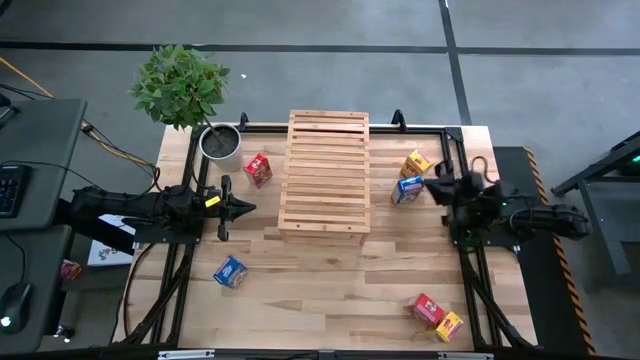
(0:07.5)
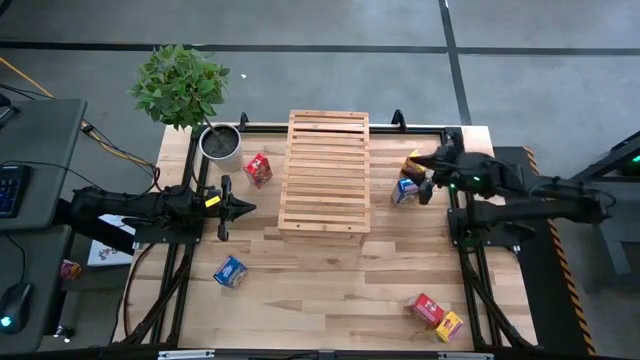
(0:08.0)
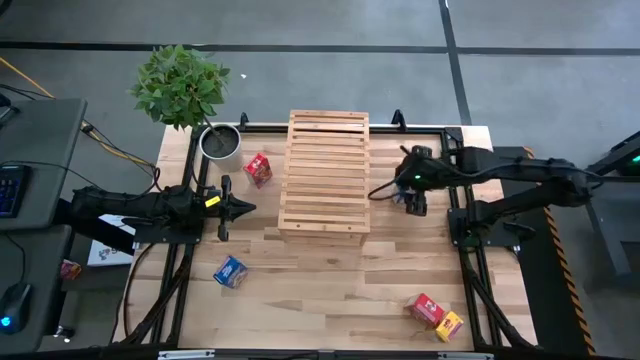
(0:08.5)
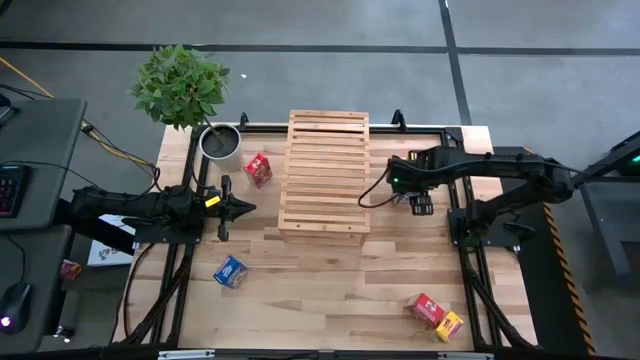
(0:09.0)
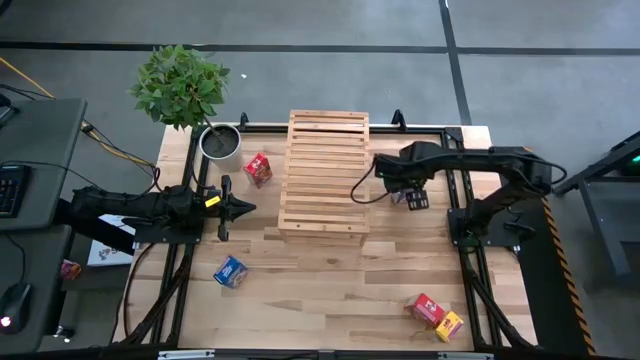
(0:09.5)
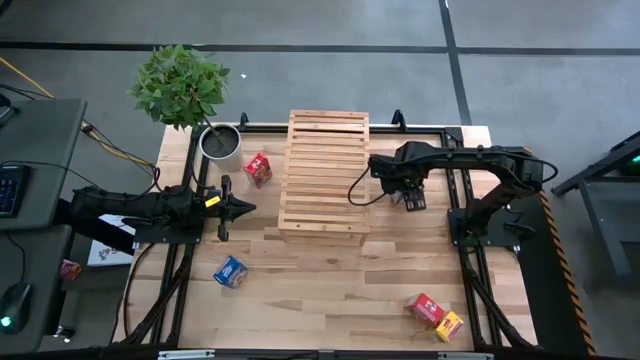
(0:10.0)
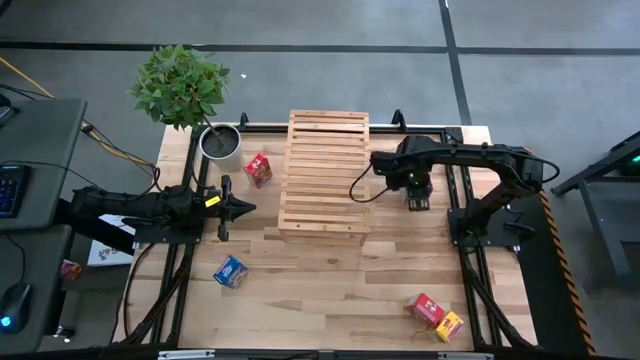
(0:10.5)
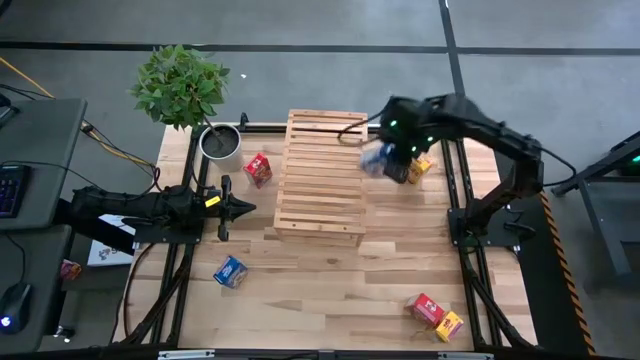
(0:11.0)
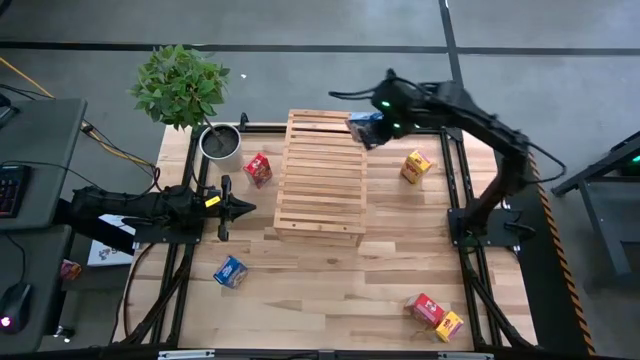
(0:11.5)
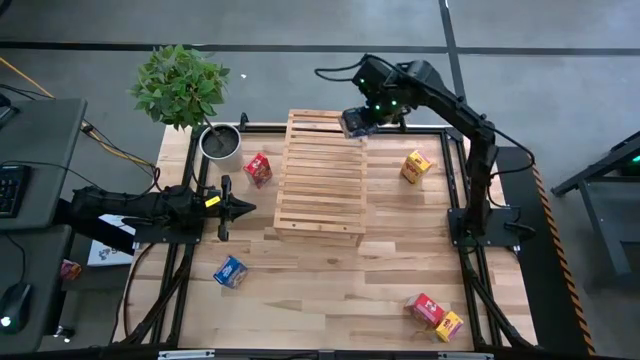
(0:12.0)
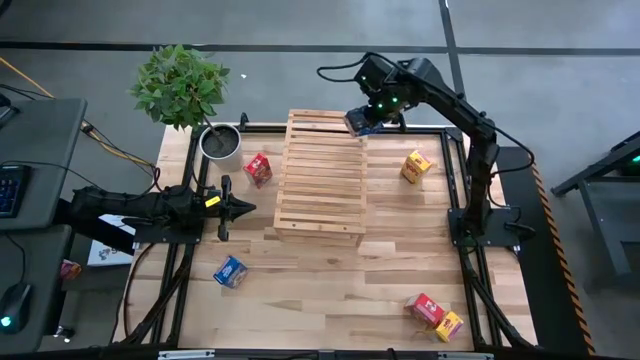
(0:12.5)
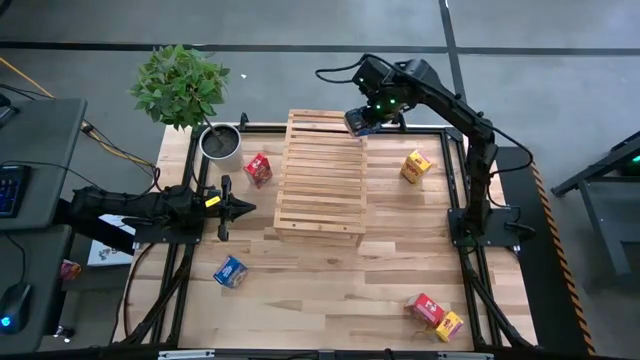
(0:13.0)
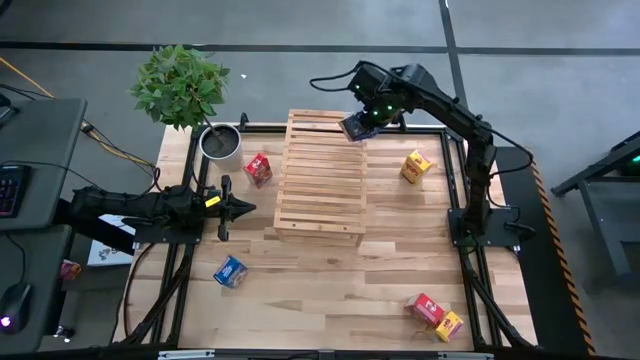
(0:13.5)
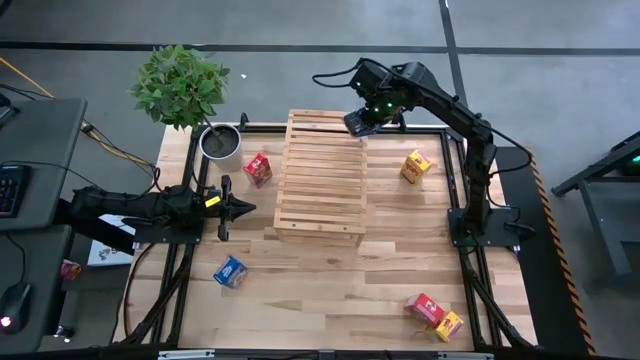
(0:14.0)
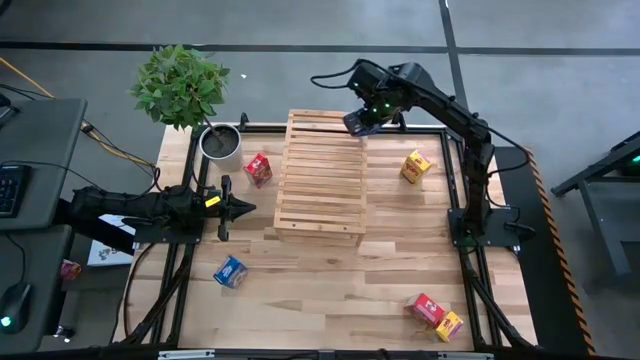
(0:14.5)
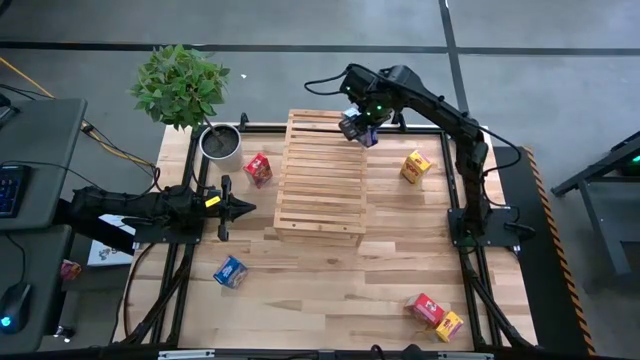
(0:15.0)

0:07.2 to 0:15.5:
Task: Stack cereal on shelf
Put the top blue cereal box on the shelf

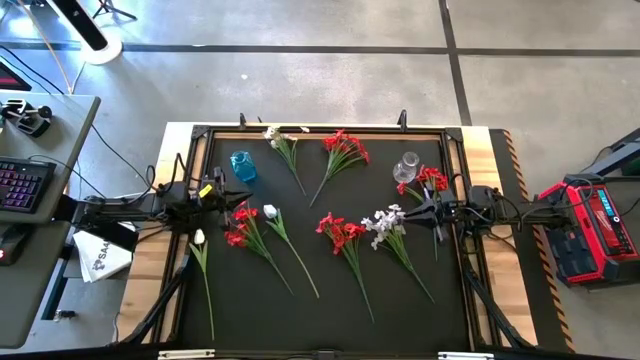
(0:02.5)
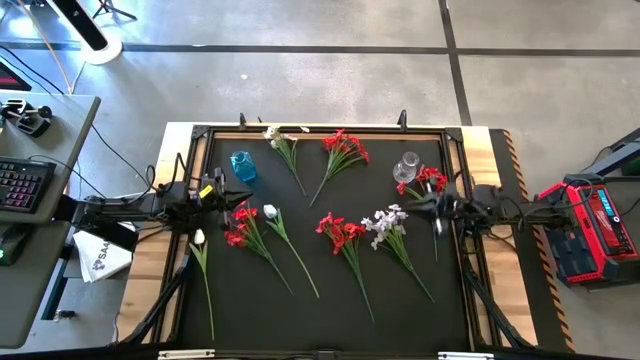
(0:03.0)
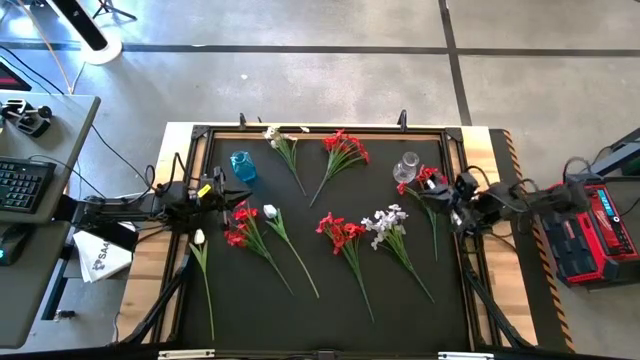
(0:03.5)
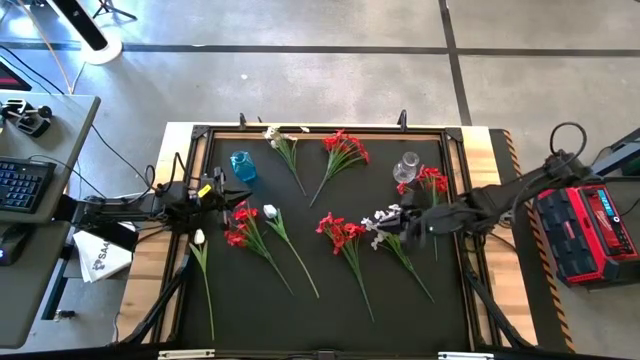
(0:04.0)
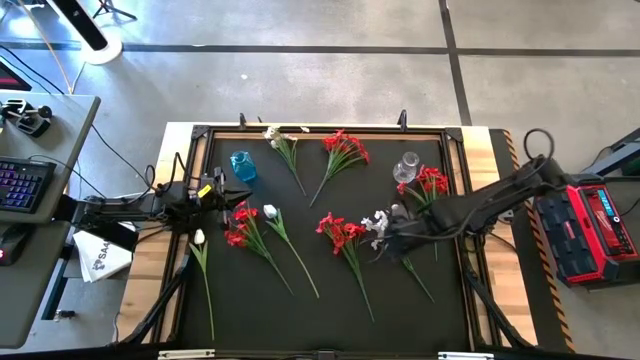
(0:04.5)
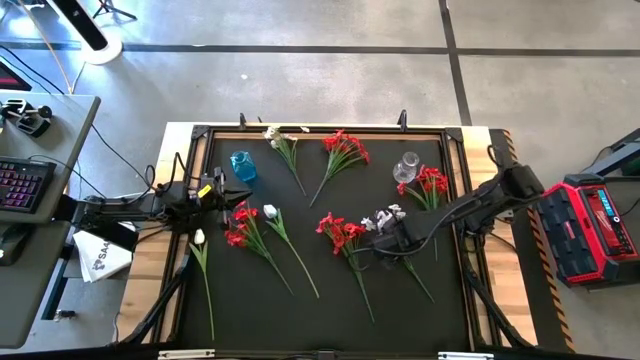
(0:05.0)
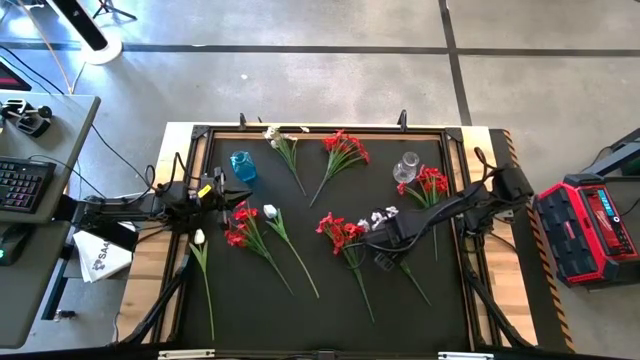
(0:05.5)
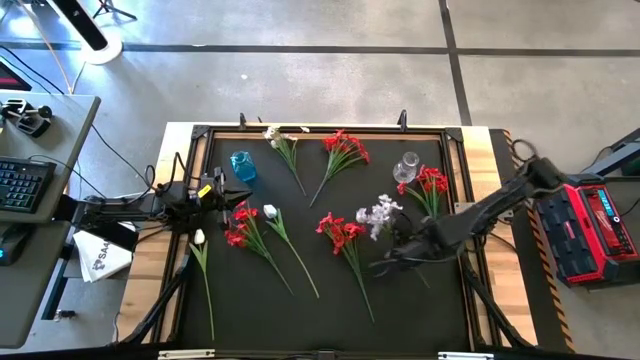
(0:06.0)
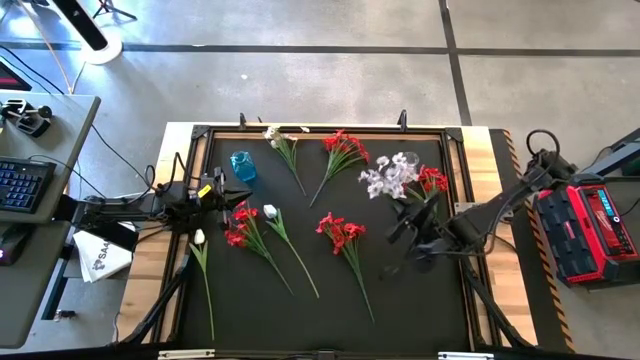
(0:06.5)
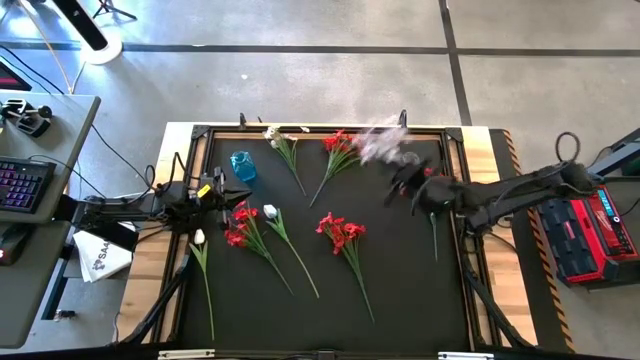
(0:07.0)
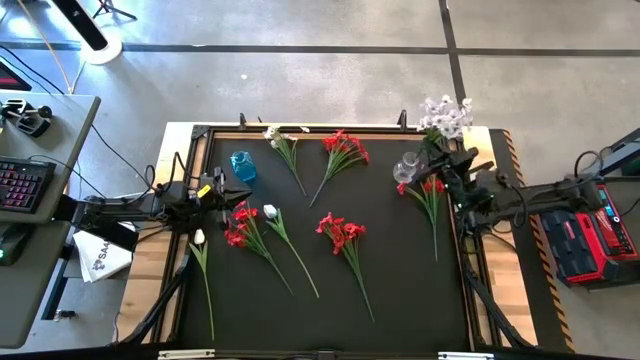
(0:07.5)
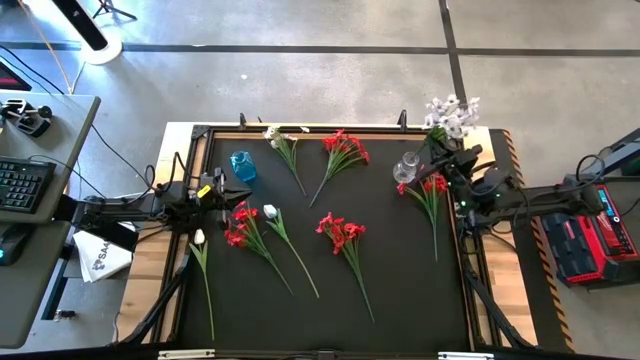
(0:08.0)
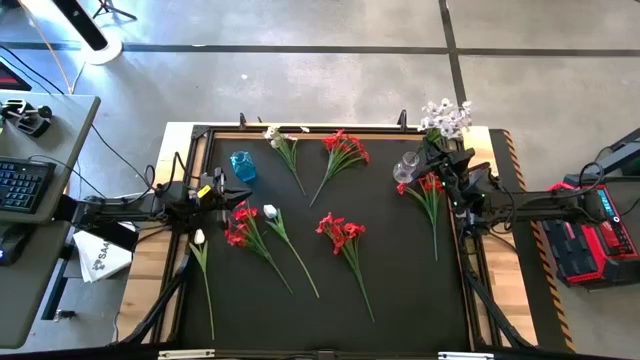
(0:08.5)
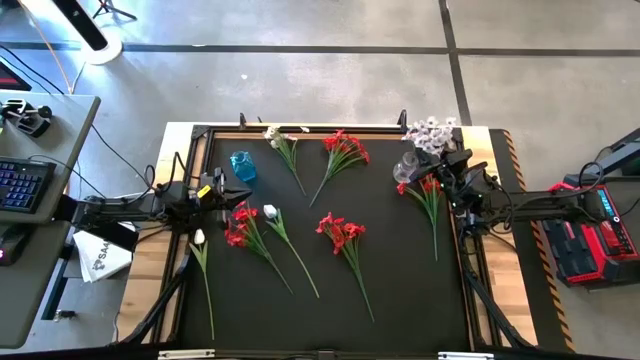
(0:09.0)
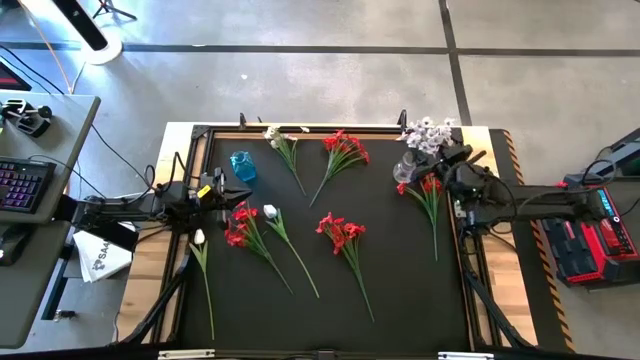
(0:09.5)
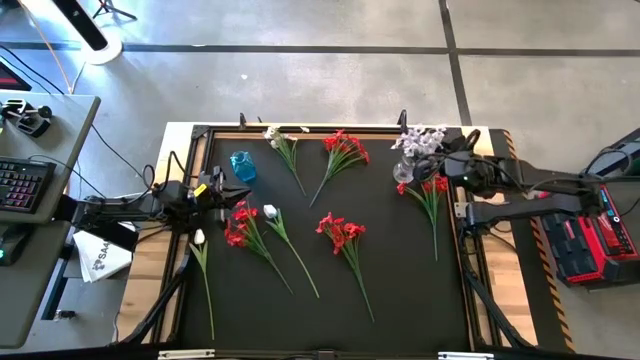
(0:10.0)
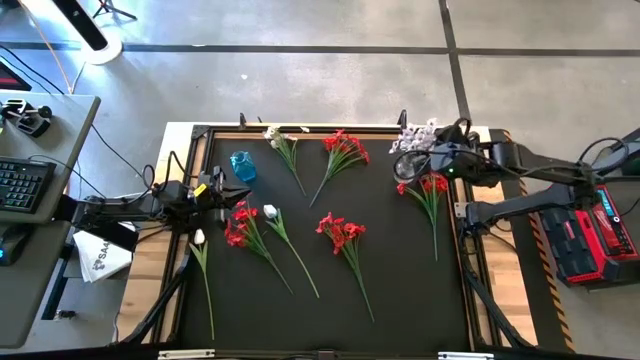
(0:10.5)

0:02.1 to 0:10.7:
Task: Sort flowers into vase by color
Put the white flowers into the transparent vase

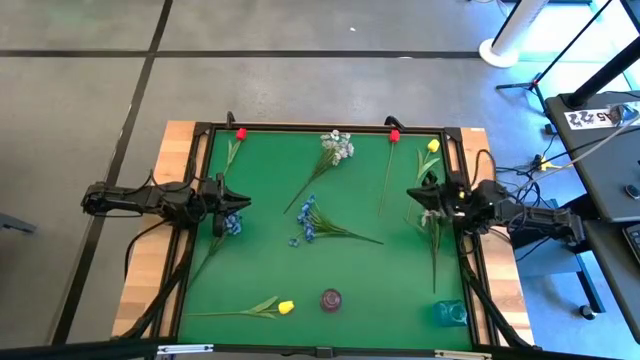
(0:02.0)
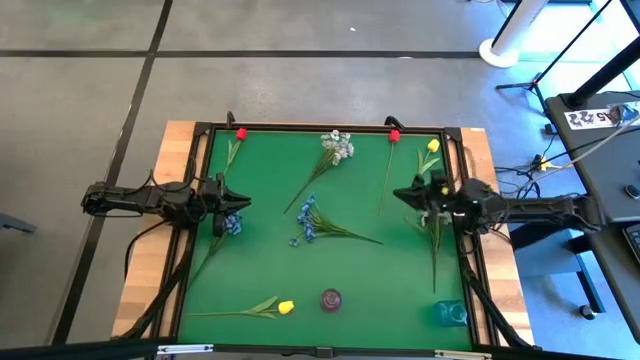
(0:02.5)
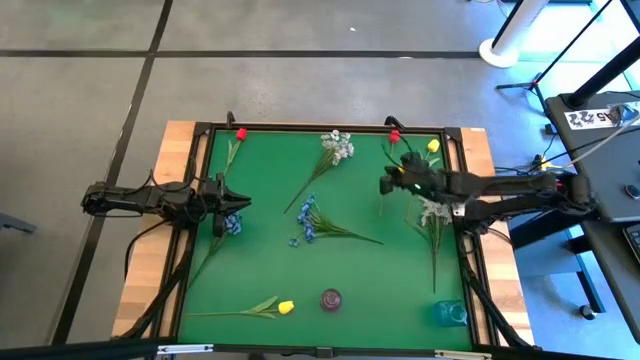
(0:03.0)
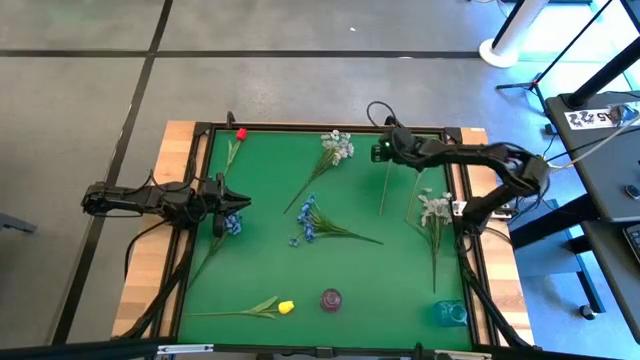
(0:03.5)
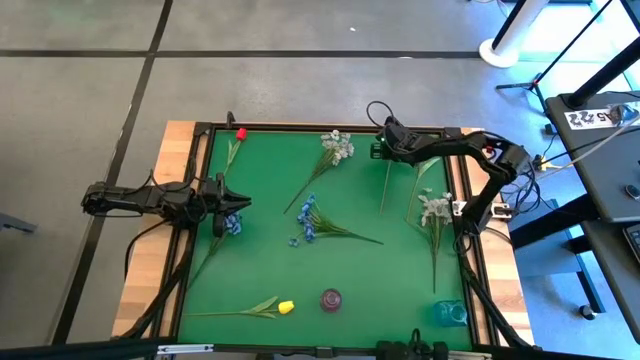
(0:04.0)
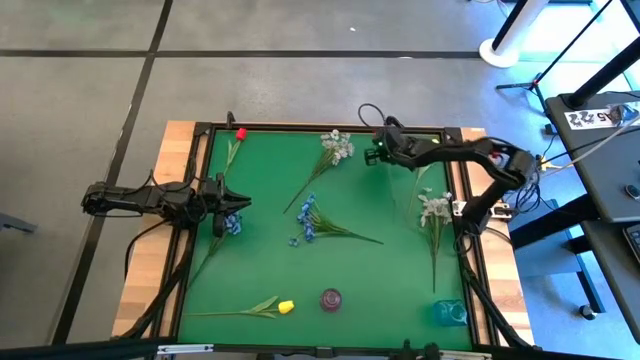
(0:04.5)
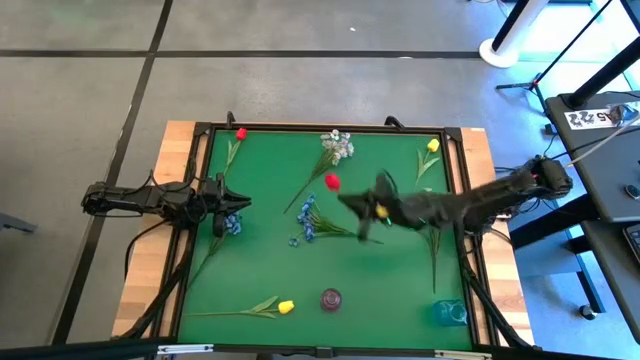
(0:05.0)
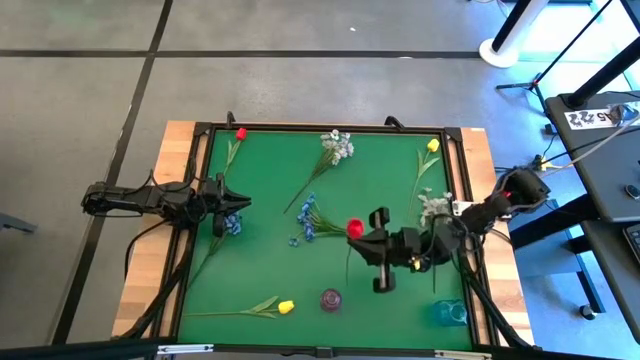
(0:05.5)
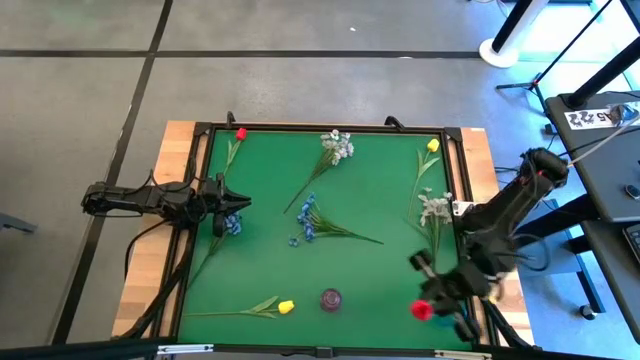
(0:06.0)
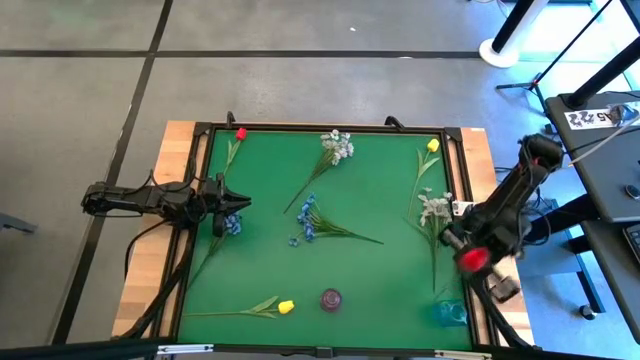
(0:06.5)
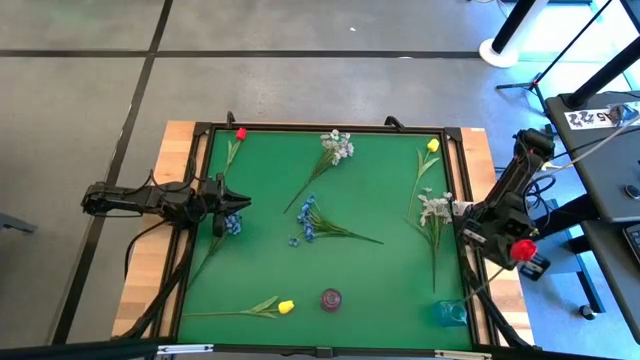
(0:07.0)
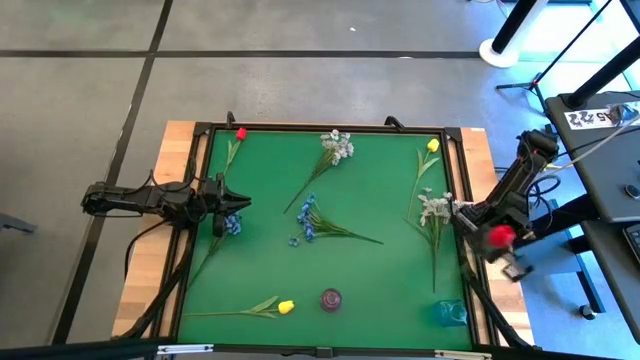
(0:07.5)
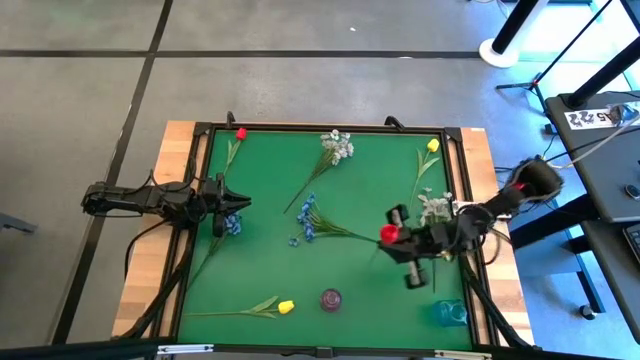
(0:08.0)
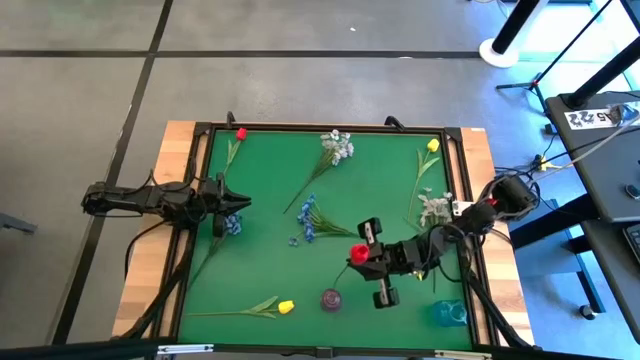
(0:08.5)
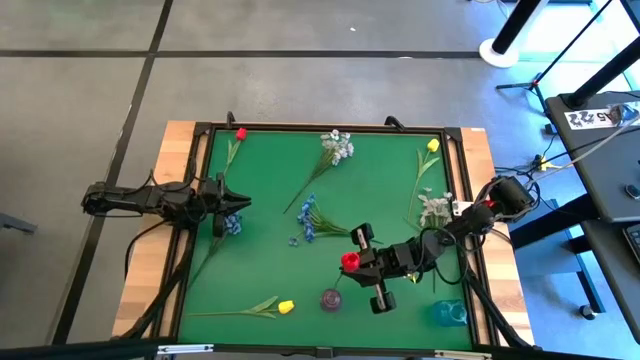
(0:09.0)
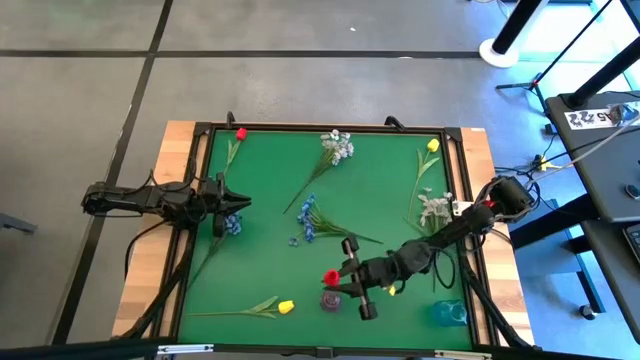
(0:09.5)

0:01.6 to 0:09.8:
Task: Sort flowers into vase by color
Put the right red flower into the violet vase
